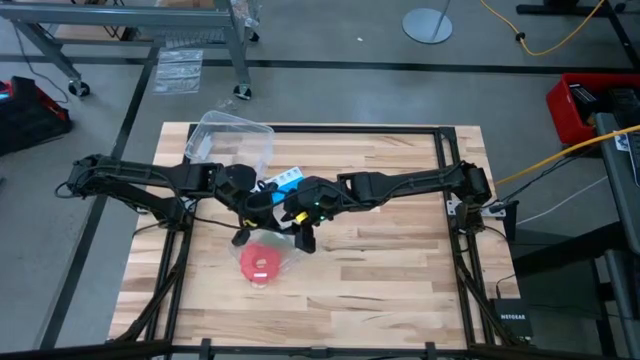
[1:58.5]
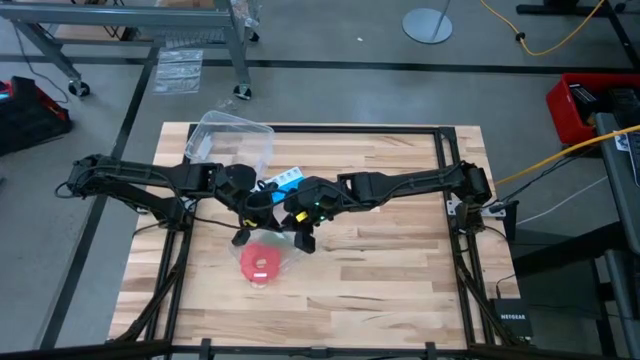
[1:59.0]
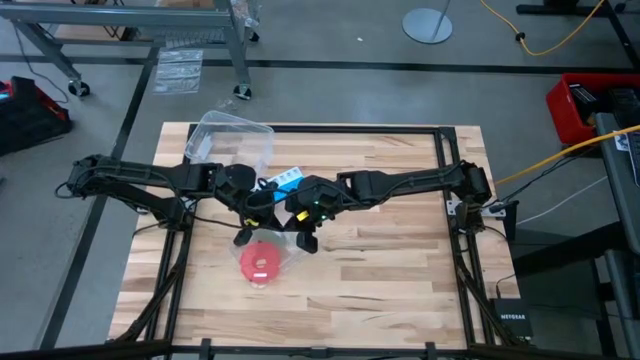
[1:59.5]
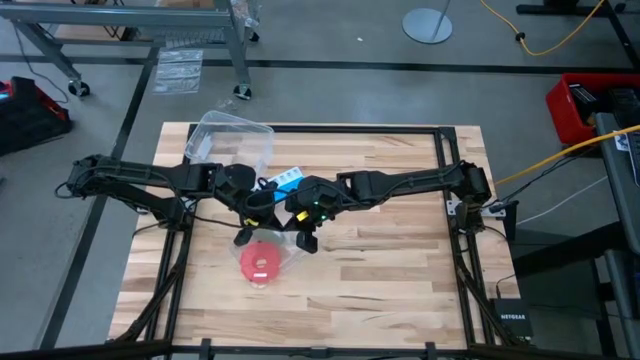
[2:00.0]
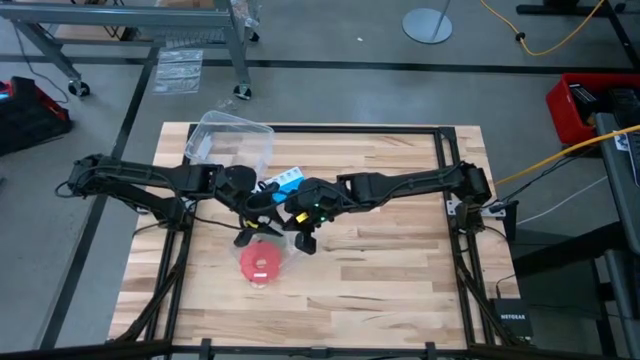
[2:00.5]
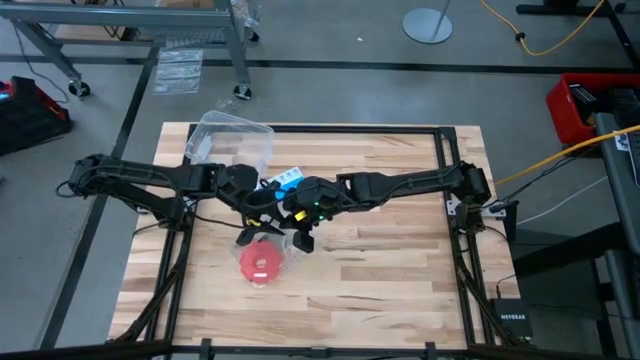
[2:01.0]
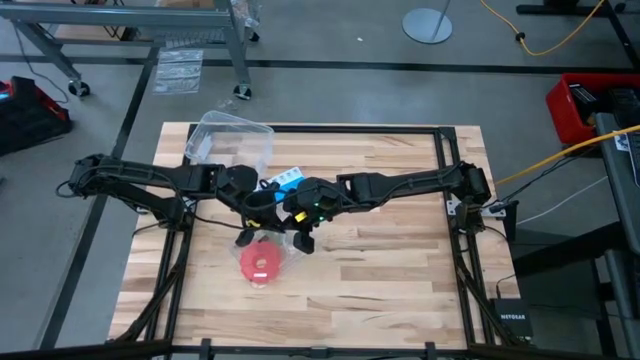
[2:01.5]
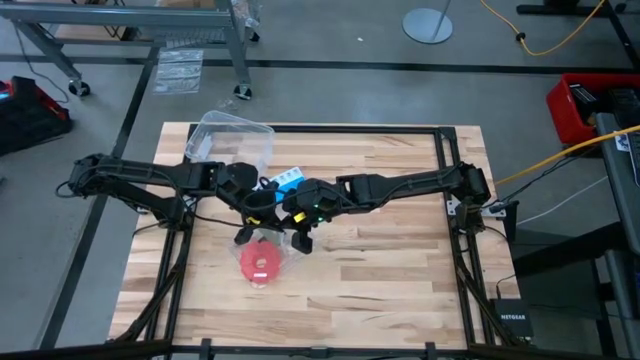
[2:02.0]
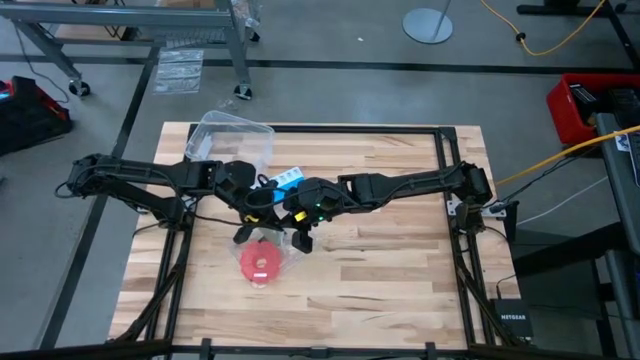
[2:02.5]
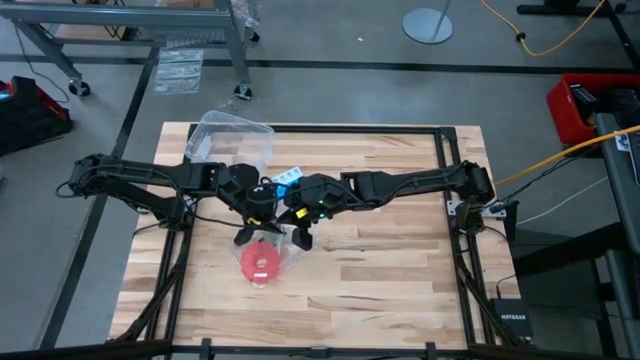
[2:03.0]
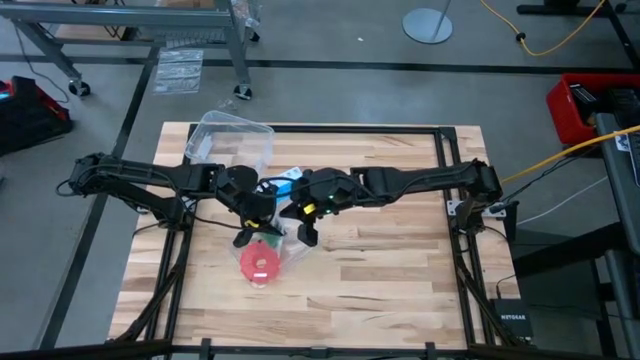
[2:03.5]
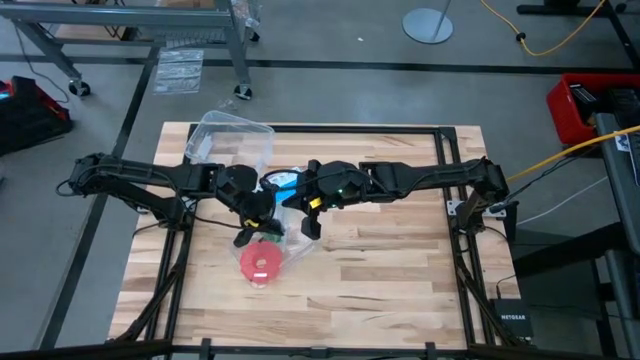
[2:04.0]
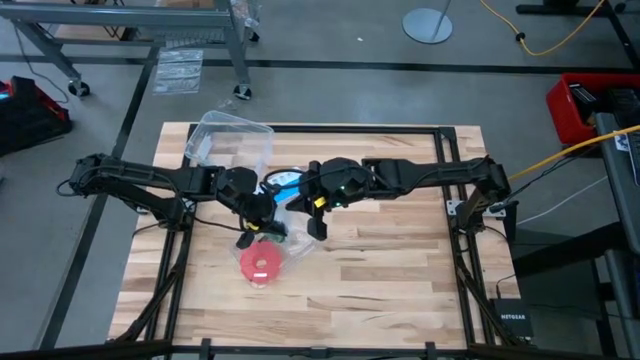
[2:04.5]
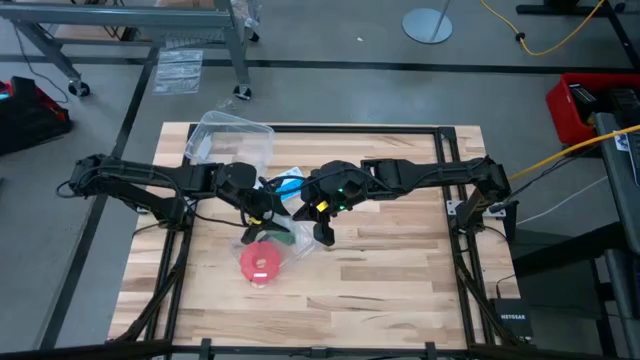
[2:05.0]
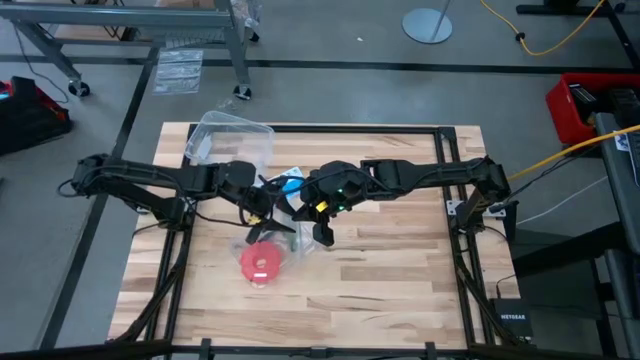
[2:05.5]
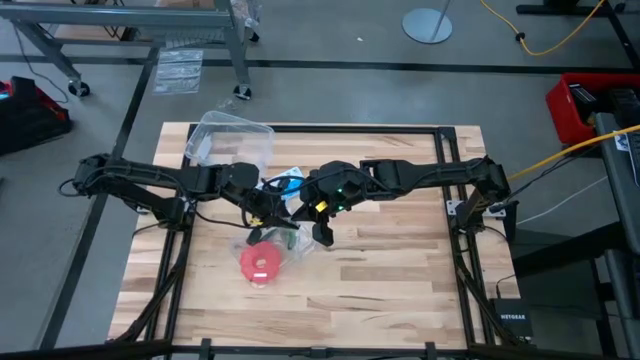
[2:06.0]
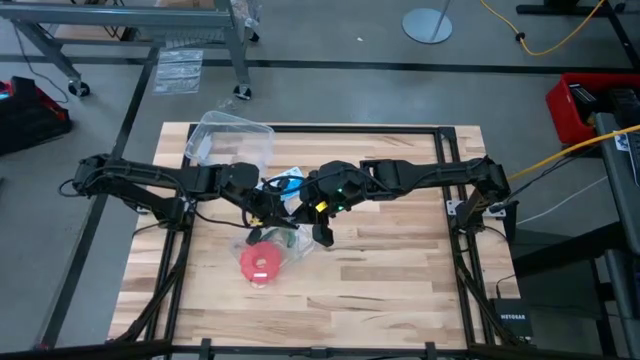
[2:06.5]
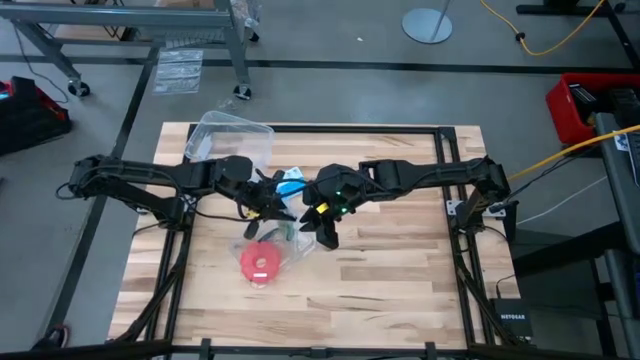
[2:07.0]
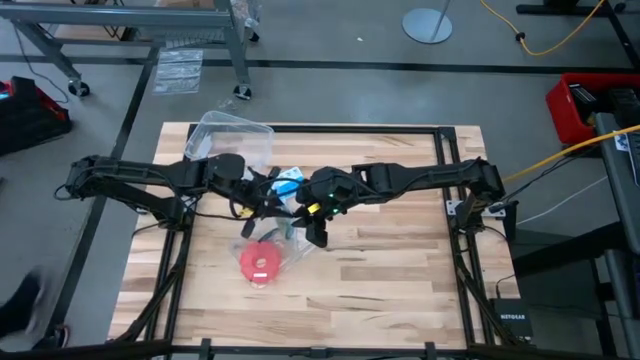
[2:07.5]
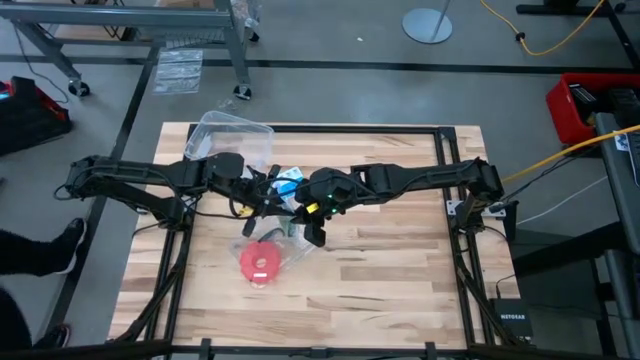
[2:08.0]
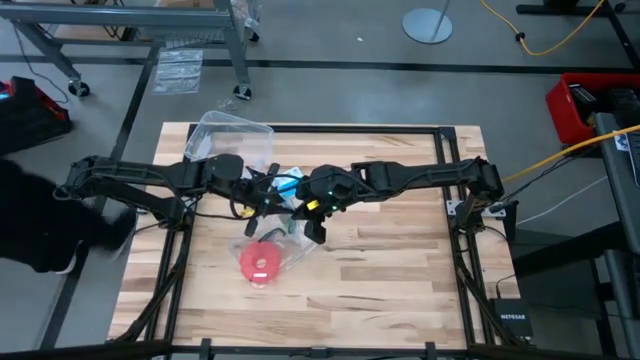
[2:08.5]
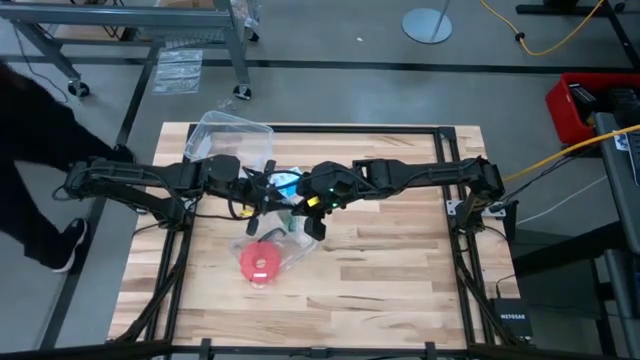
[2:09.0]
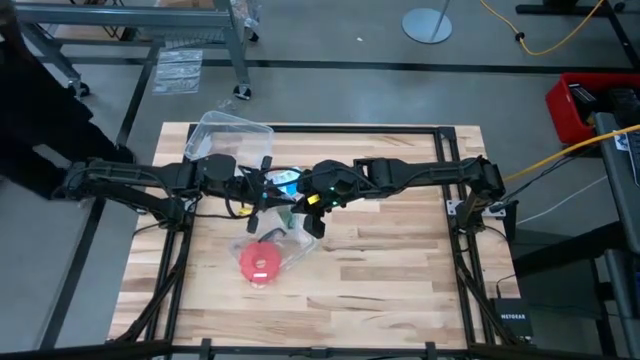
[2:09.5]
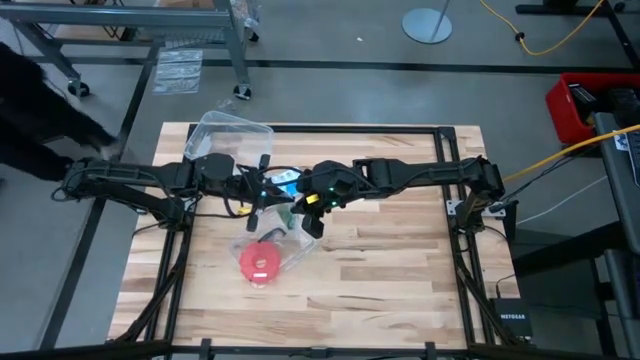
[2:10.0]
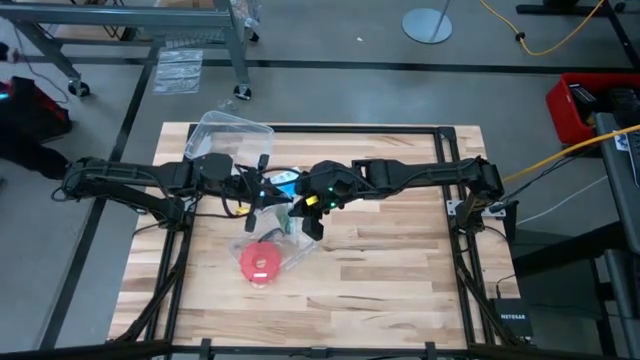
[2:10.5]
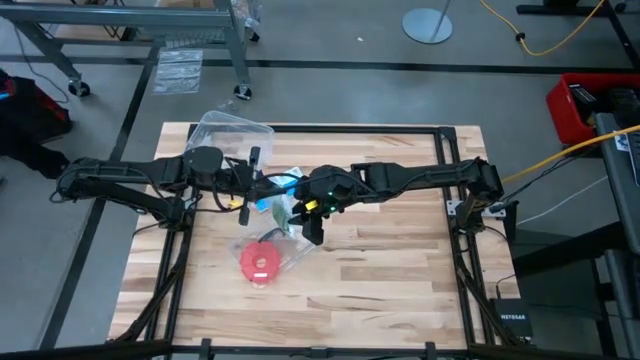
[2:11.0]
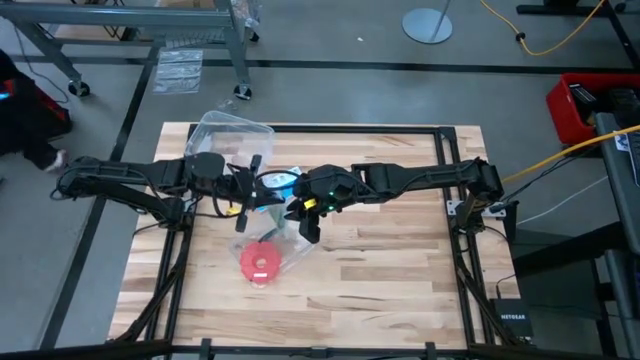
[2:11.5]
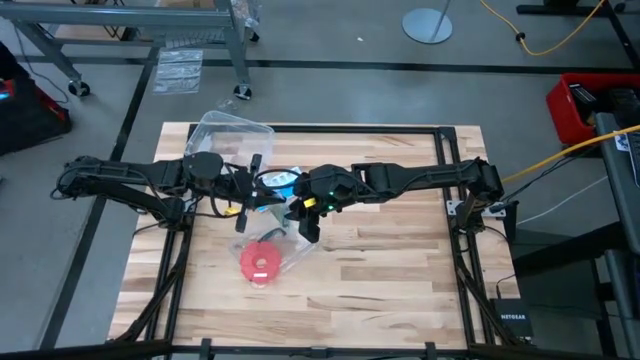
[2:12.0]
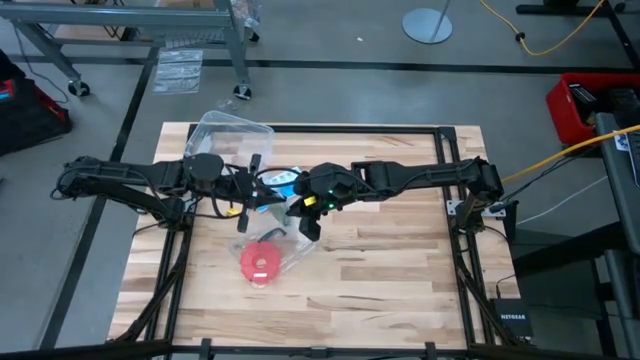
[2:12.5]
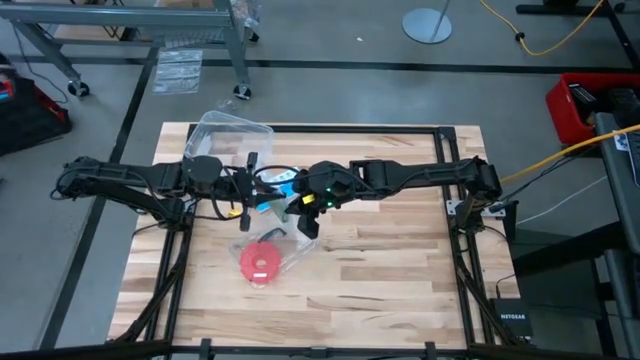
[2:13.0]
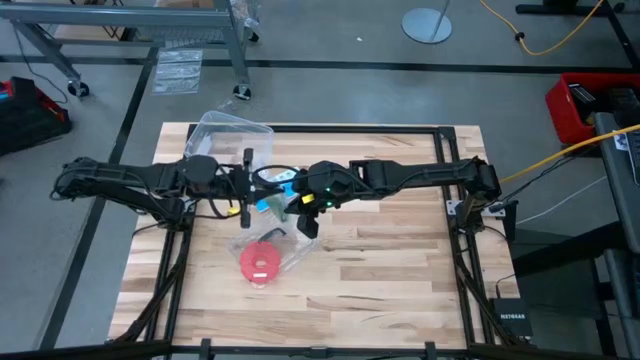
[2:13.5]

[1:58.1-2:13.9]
Task: Roll bandage
Close the transparent zip bag

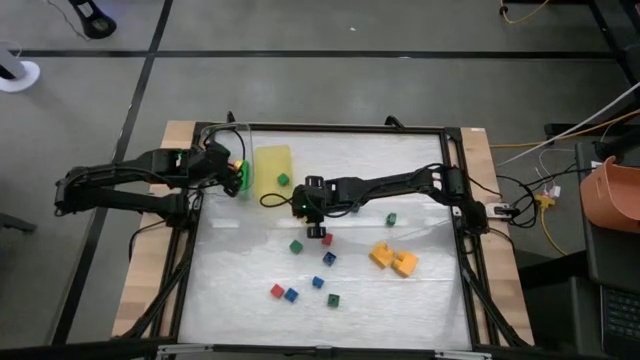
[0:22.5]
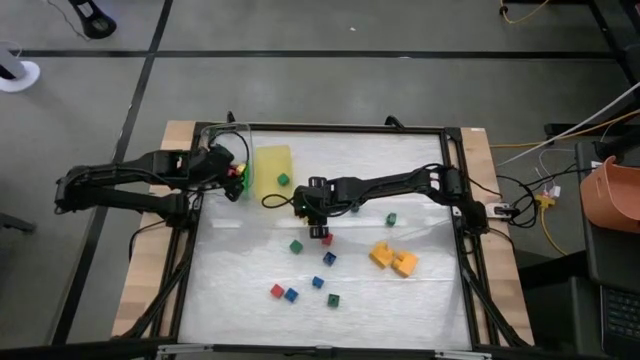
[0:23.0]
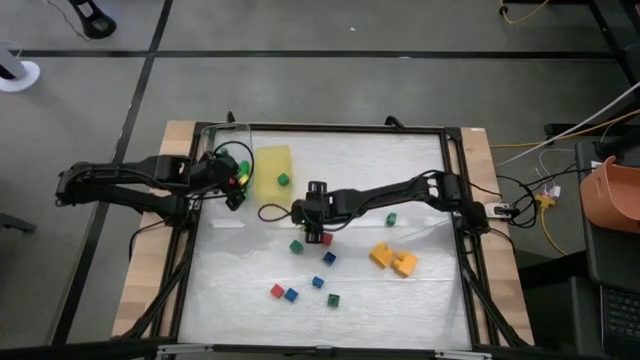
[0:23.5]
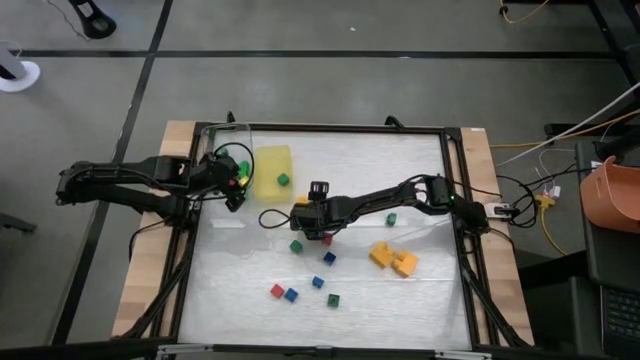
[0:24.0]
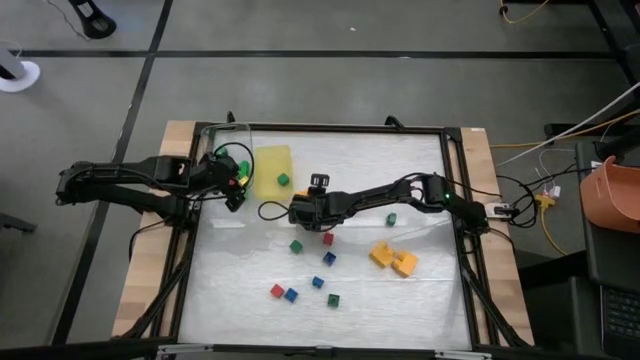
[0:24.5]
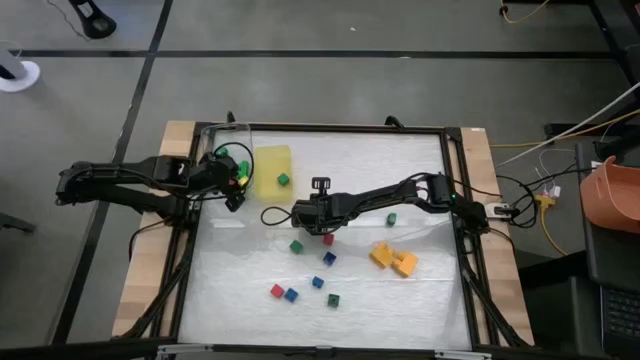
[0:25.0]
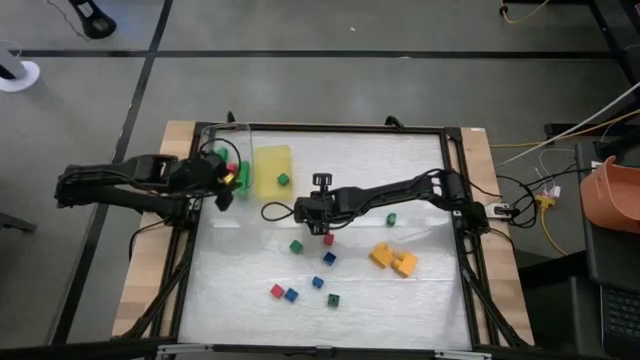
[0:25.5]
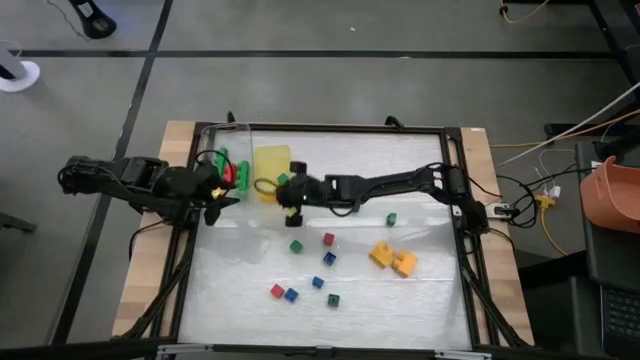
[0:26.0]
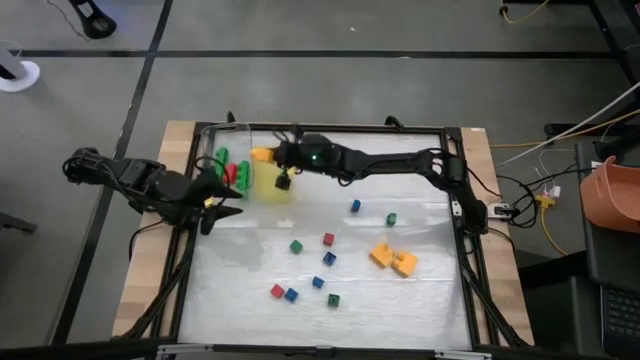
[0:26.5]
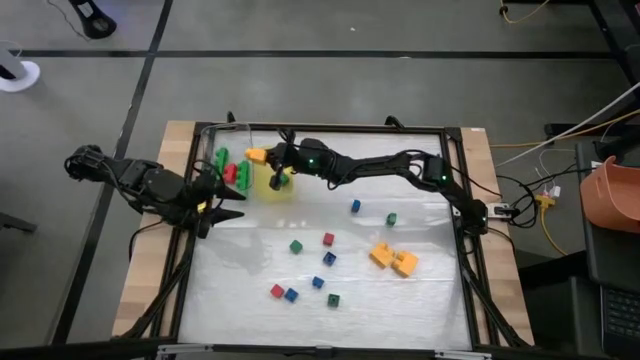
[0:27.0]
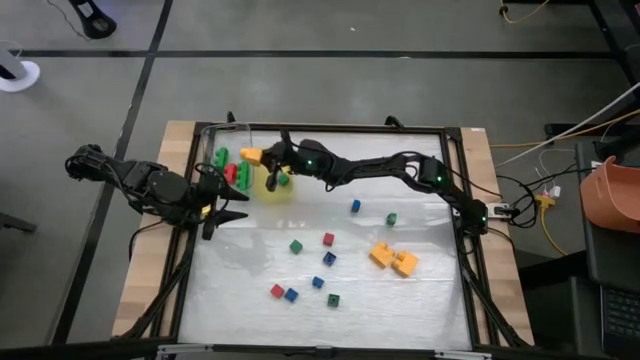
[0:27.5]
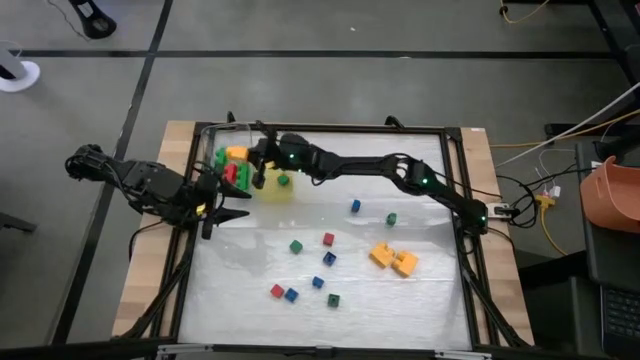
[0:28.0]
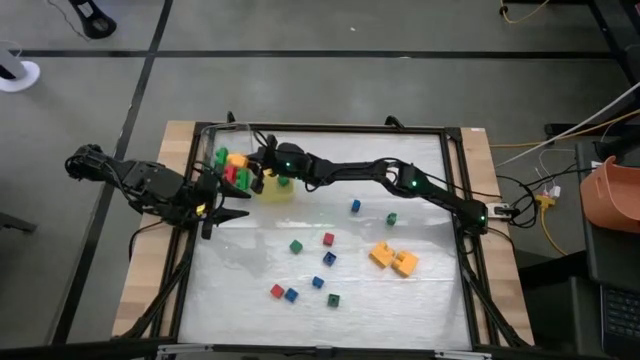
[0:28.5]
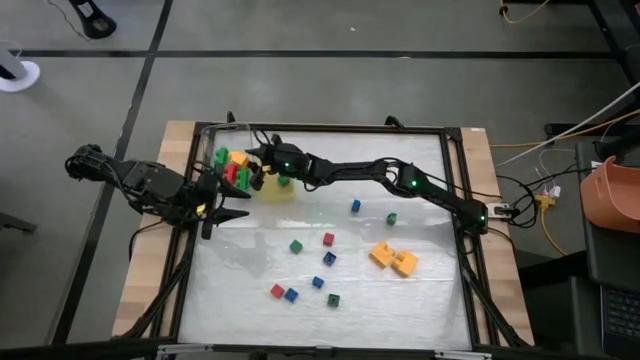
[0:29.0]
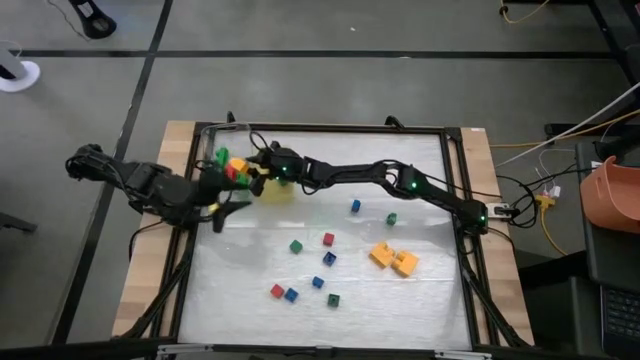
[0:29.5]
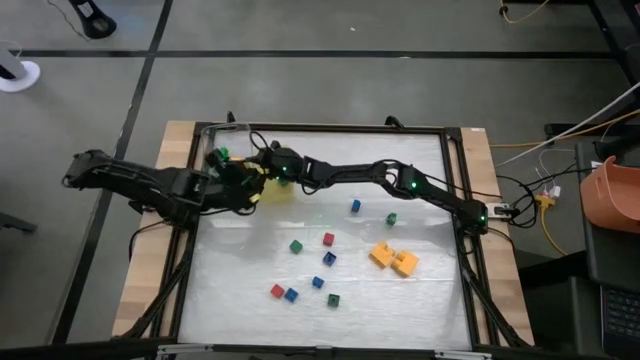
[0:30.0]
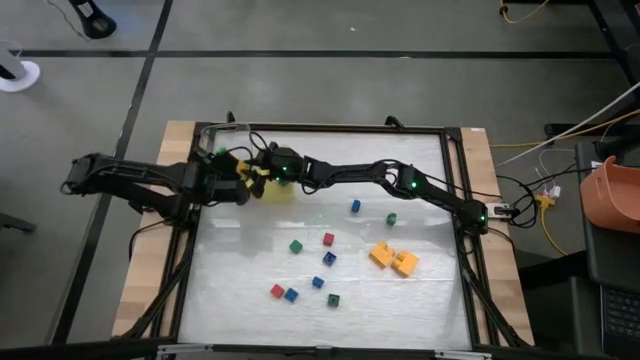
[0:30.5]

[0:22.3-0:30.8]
Task: Sort blocks by size
Put the large yellow game piece into the transparent bin
